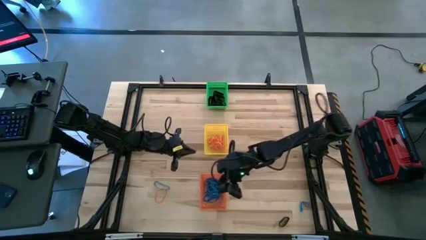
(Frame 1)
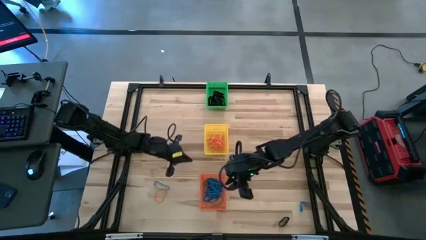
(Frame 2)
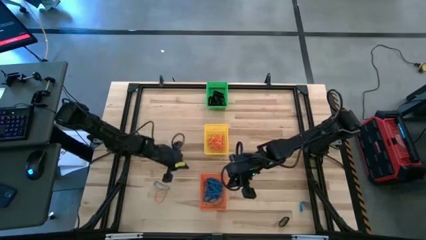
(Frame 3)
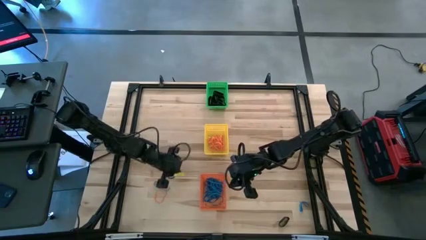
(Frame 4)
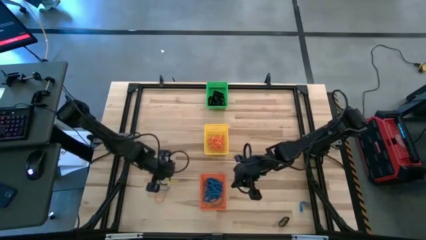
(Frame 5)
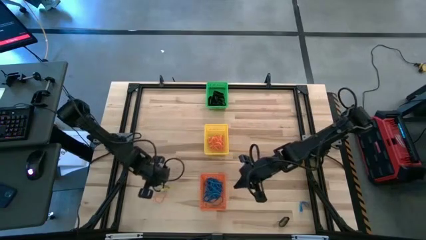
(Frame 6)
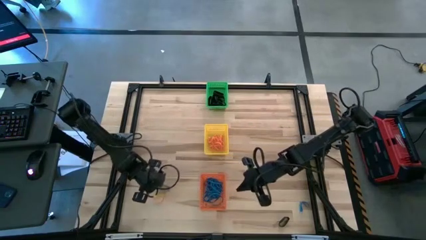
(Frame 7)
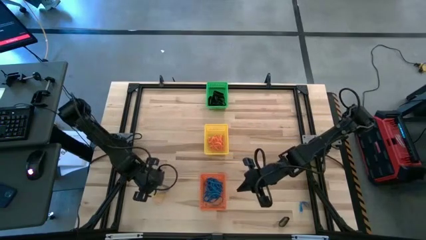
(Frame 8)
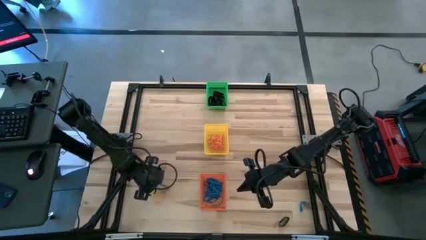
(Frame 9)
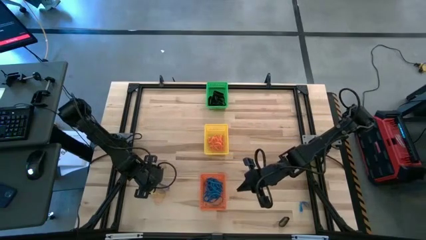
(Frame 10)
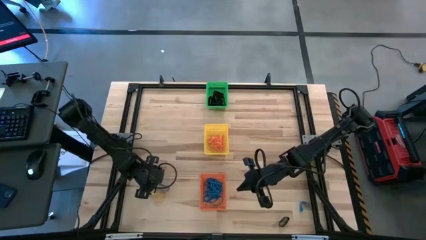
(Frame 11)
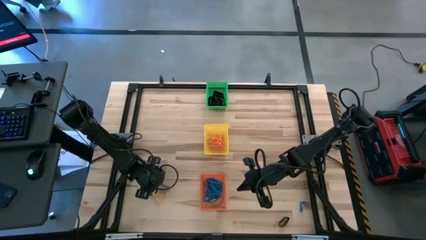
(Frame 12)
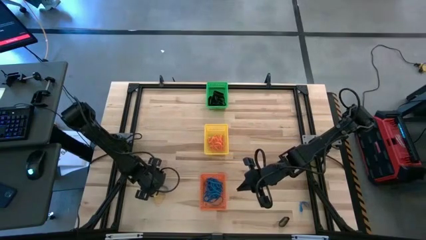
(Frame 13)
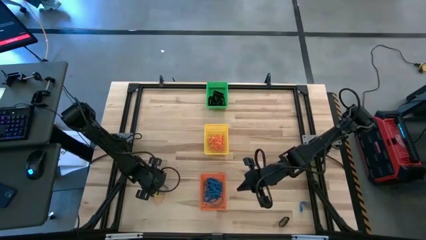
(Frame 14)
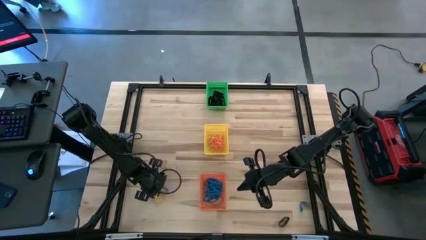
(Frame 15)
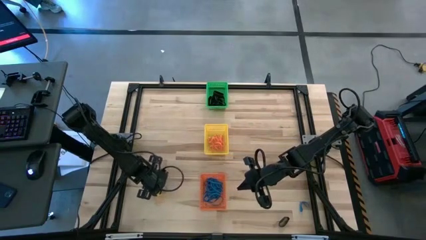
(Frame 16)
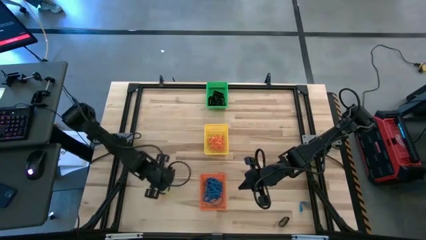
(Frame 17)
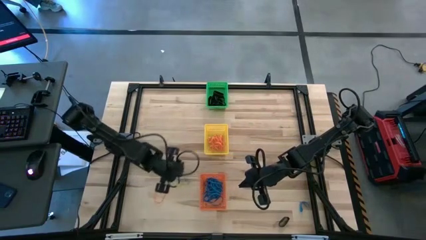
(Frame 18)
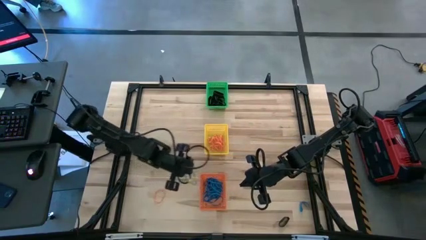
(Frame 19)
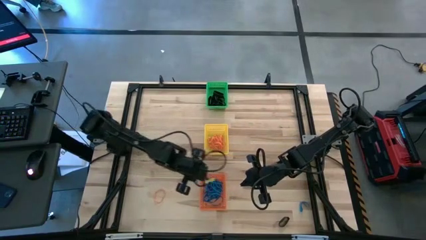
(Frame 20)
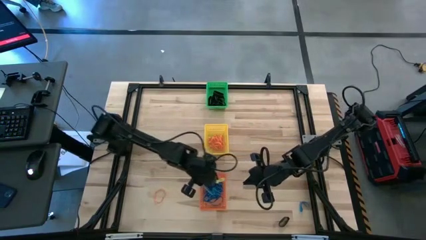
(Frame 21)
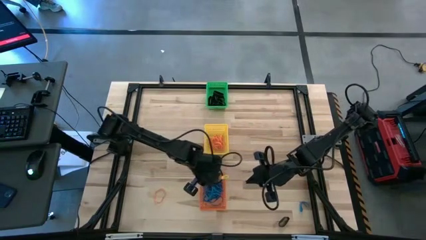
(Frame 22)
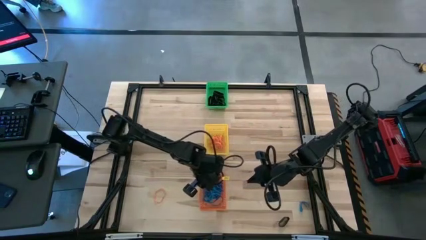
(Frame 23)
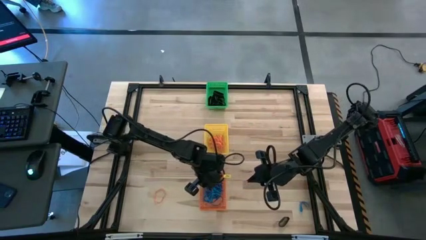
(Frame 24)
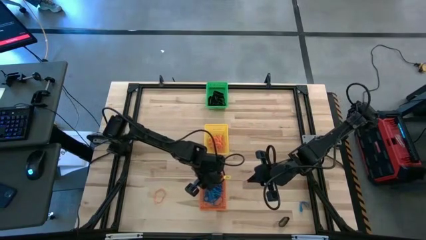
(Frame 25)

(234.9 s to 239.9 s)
Task: Sort rubber bands into baskets
Put the blue rubber band into the orange bin

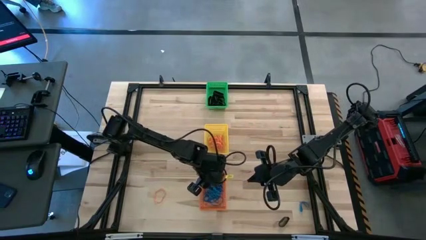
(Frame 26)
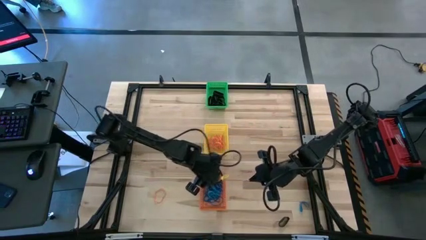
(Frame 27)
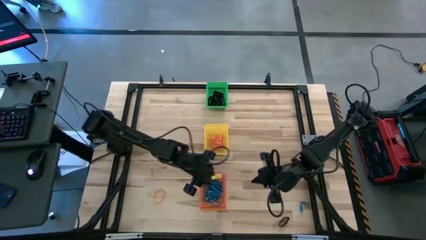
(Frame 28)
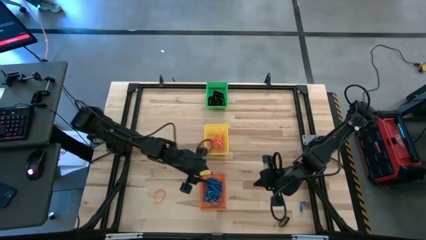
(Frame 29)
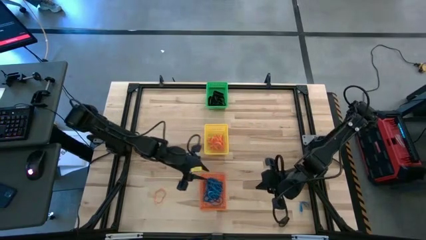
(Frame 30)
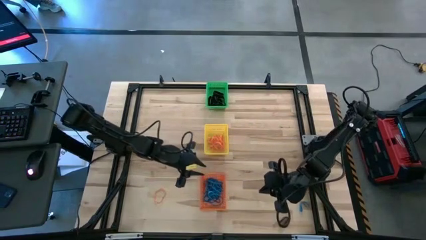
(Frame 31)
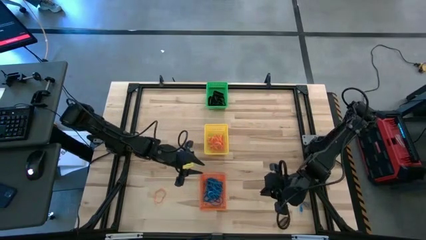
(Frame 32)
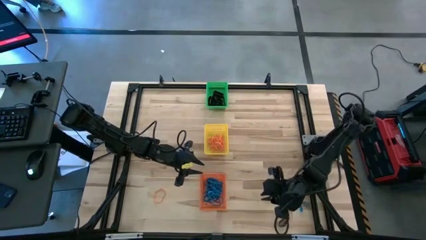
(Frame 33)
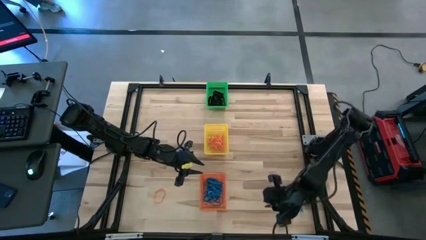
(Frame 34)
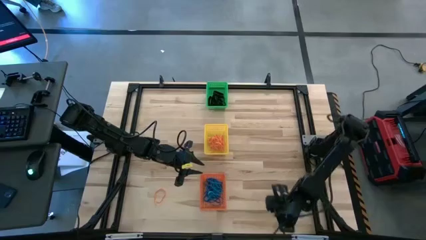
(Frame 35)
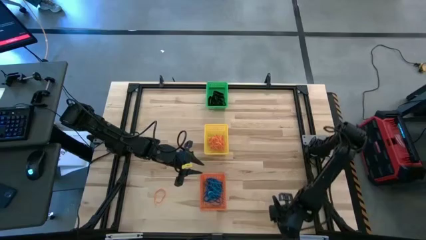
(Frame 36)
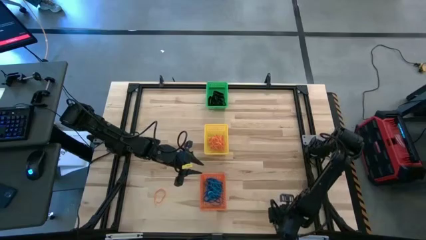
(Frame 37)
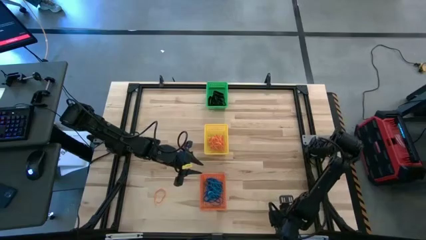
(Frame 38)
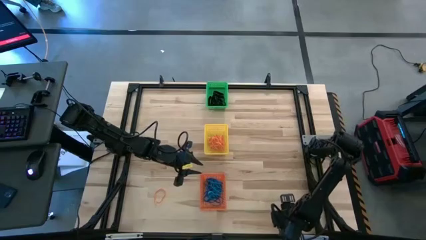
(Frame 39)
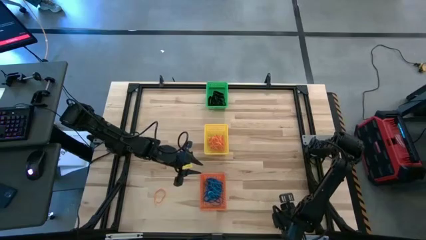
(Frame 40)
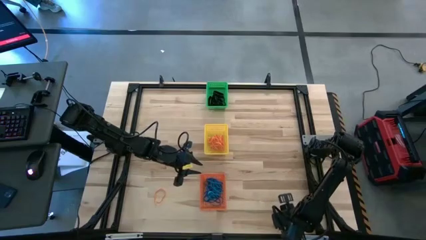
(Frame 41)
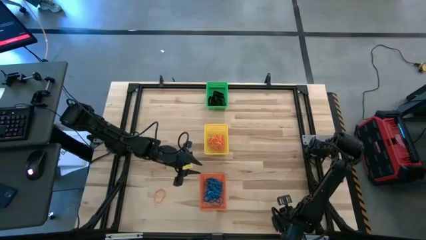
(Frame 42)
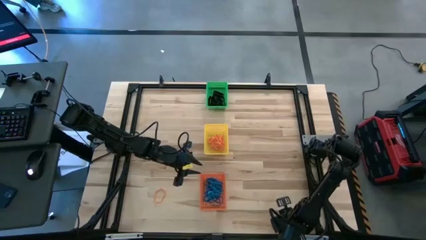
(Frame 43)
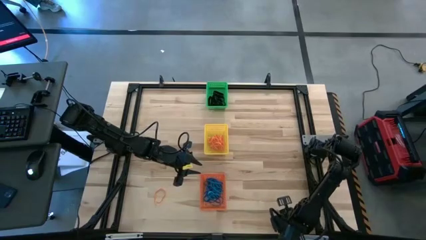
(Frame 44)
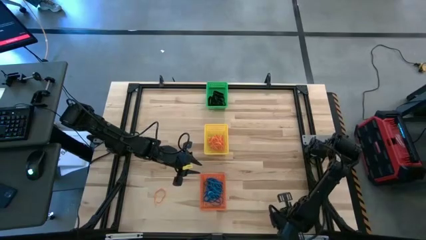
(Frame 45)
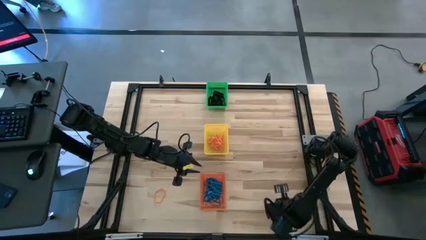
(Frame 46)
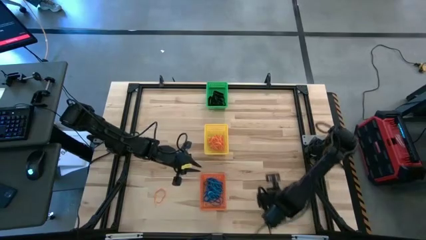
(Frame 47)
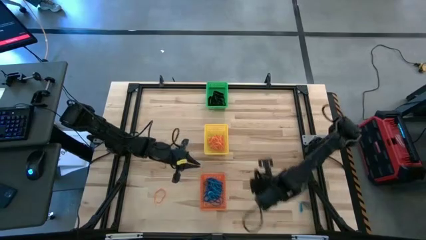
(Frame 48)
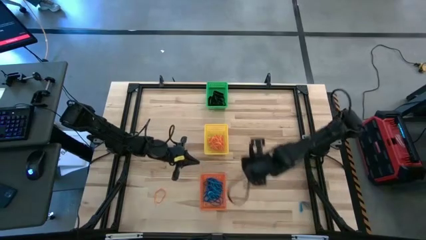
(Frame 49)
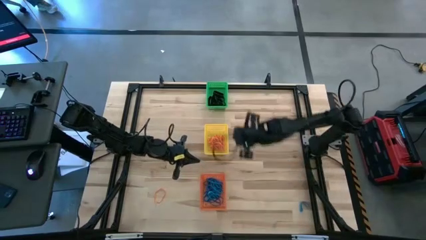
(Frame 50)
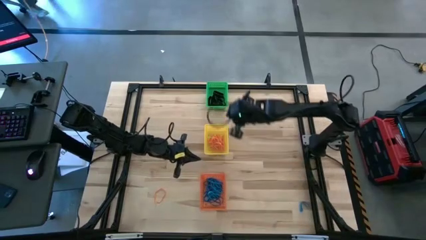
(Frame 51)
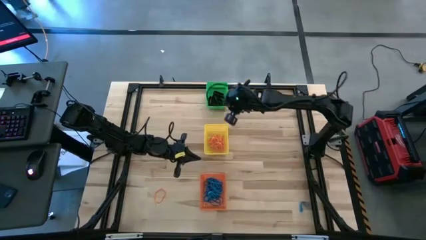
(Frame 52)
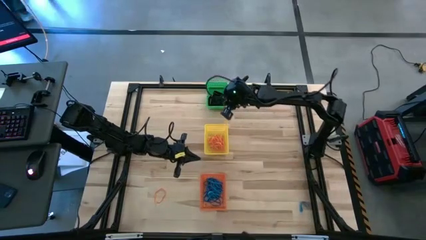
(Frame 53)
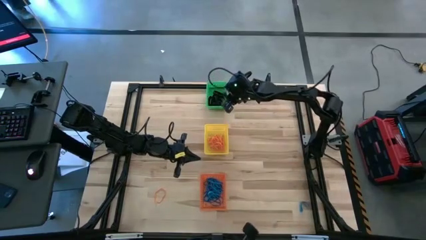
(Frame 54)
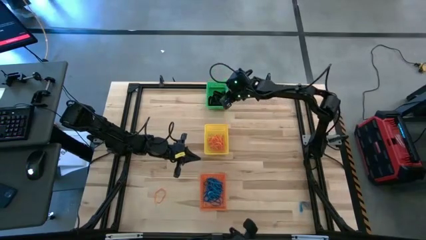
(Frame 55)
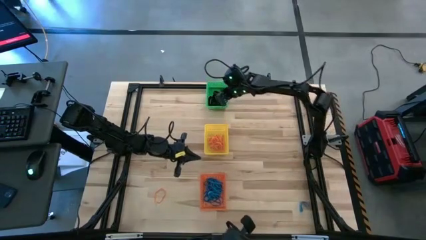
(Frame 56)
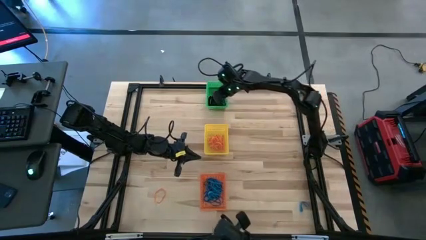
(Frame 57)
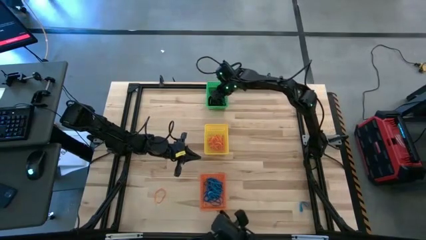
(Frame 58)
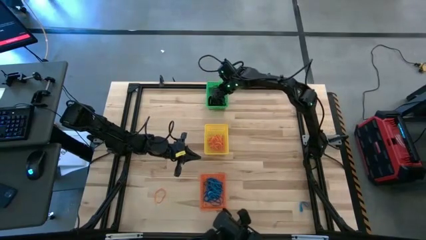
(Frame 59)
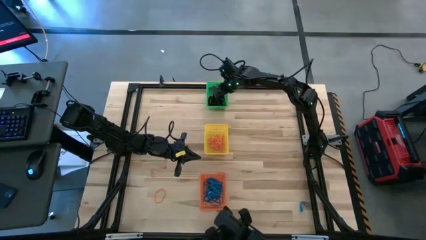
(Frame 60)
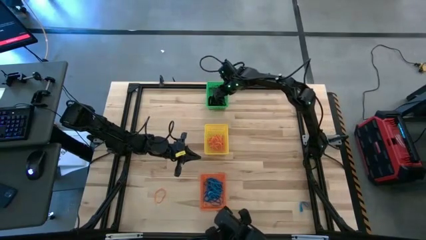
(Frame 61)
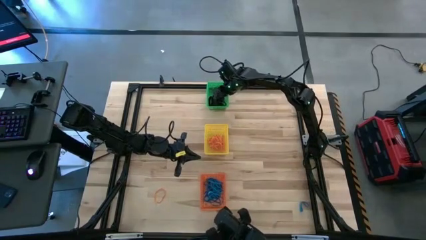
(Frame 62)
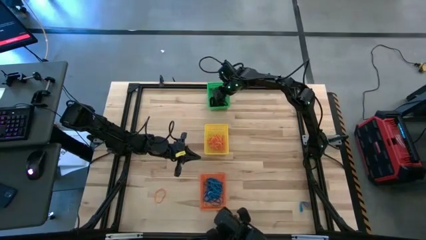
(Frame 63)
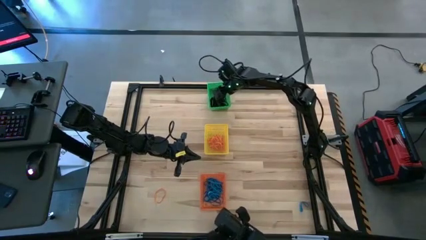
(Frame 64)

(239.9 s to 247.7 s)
Put the black rubber band into the green bin

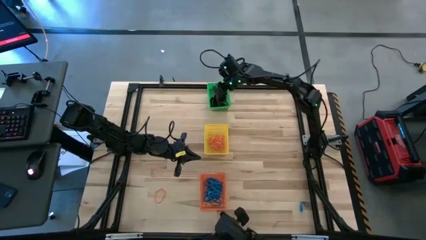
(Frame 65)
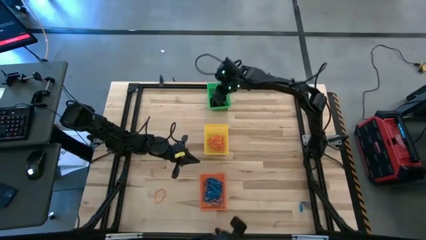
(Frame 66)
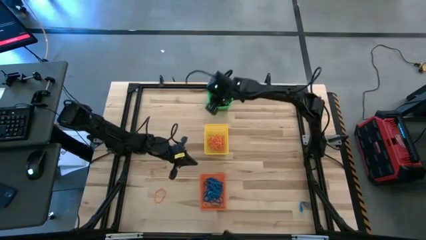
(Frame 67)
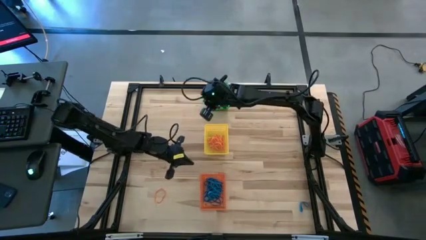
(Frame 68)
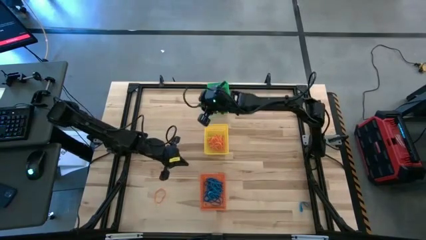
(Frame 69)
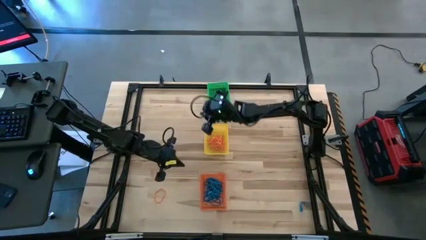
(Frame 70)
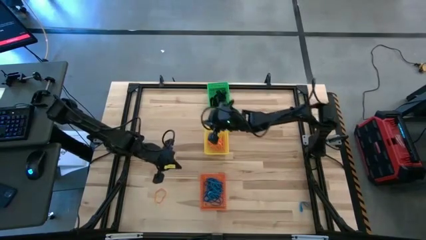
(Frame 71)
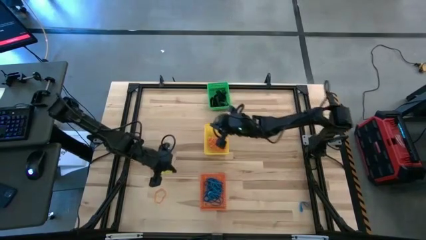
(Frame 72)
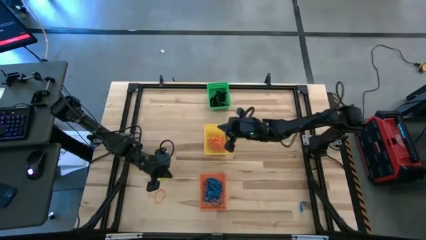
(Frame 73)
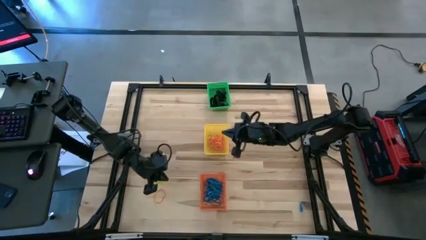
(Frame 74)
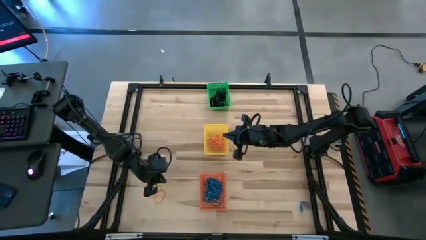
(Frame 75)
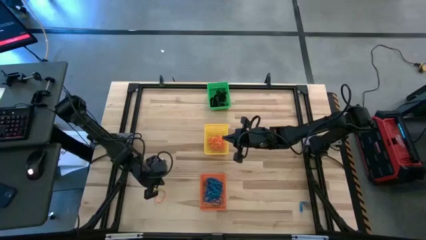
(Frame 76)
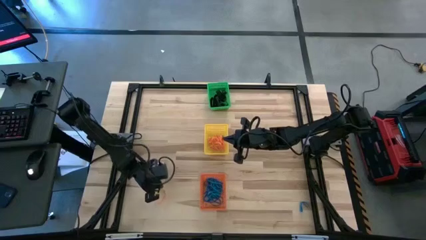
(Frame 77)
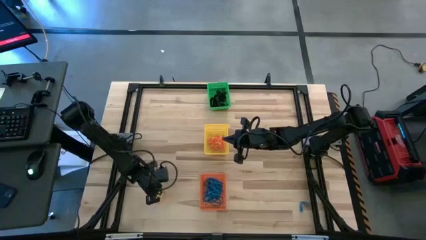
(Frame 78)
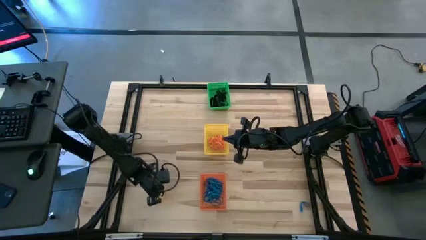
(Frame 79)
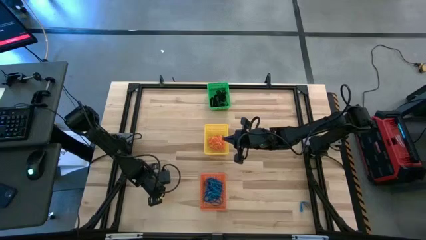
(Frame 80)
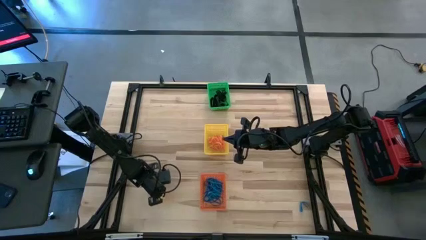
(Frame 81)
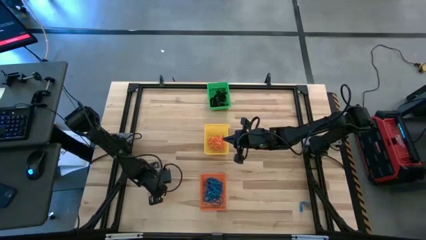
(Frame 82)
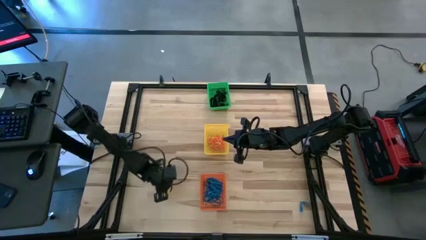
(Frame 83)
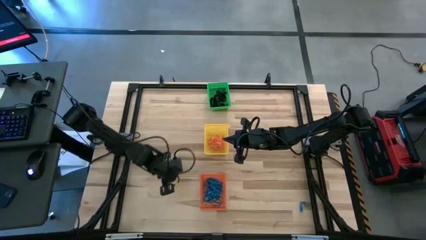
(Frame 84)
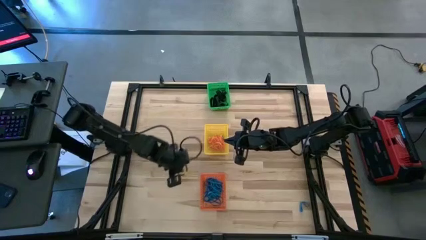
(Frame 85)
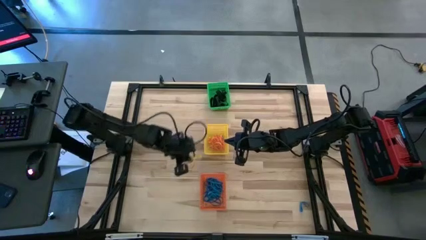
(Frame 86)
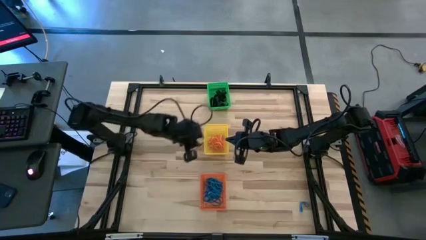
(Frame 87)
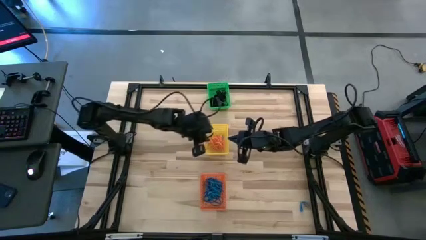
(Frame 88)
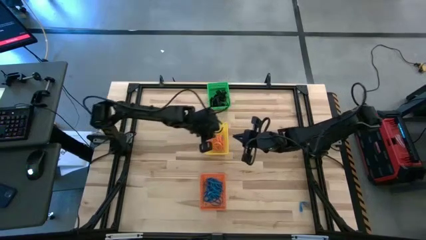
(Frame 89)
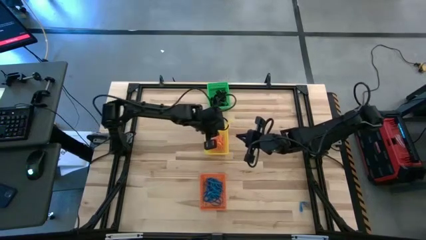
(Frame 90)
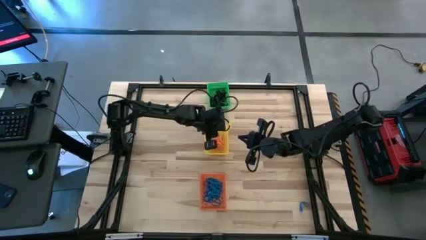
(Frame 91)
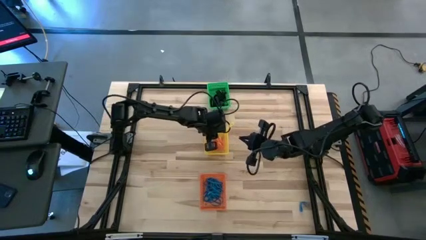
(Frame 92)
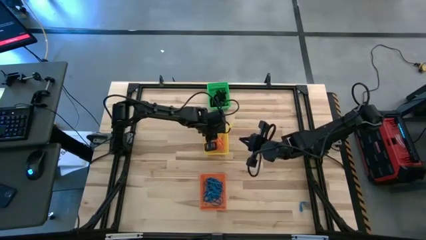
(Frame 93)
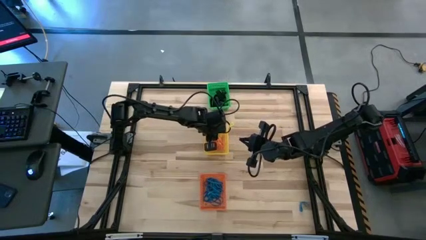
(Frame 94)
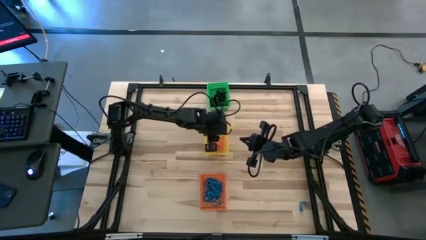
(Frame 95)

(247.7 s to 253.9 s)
Put the orange rubber band into the yellow bin
